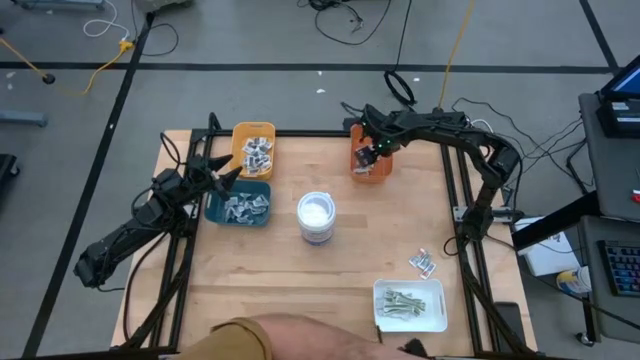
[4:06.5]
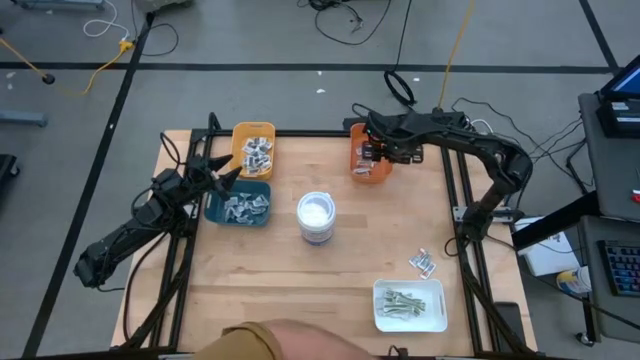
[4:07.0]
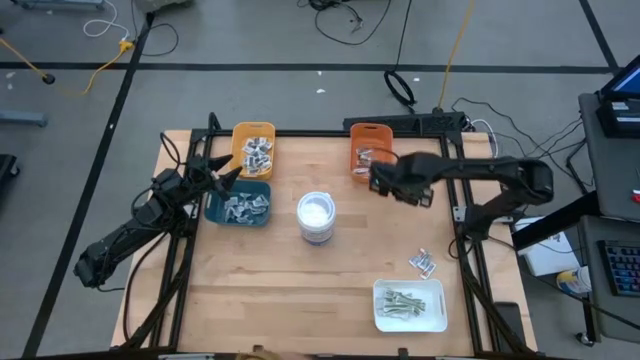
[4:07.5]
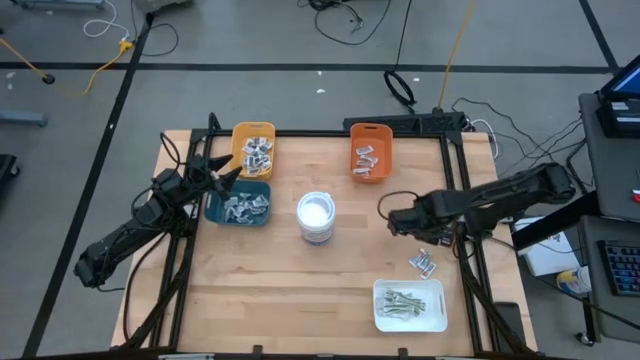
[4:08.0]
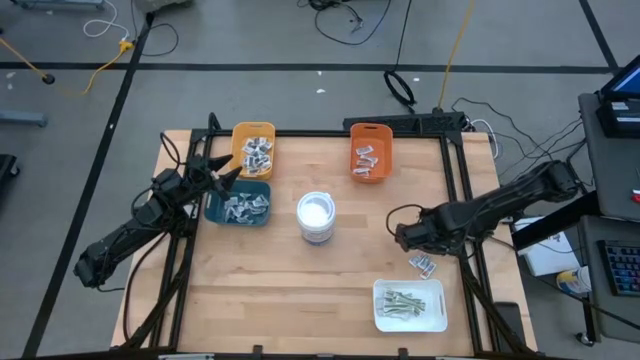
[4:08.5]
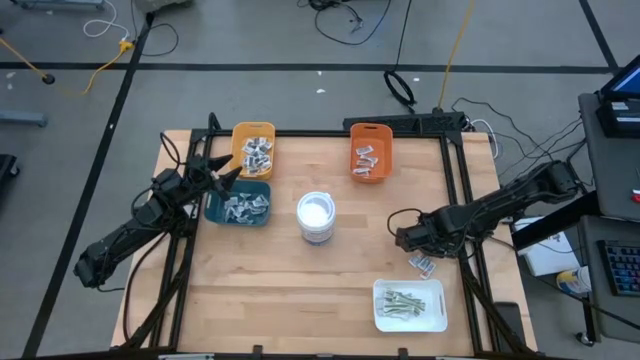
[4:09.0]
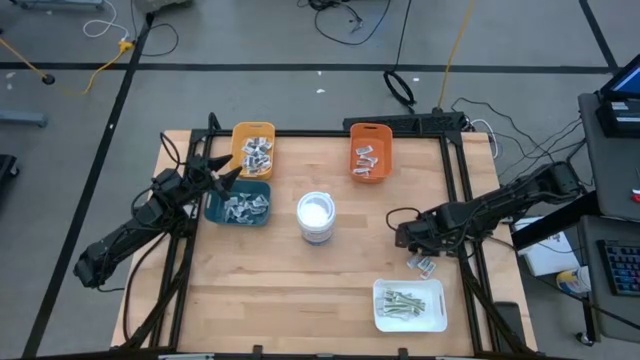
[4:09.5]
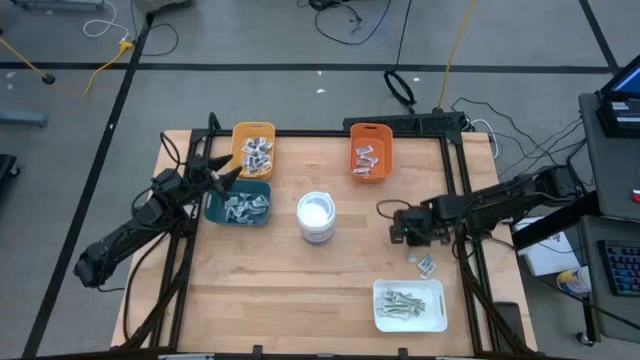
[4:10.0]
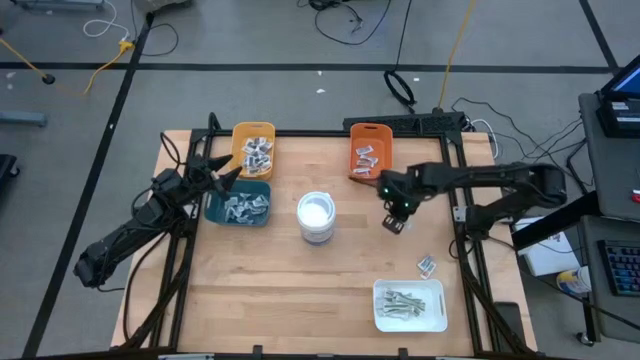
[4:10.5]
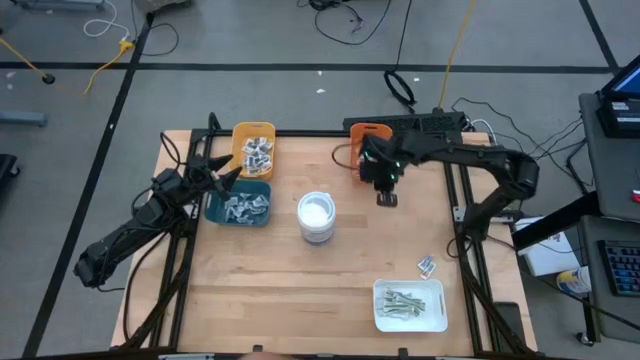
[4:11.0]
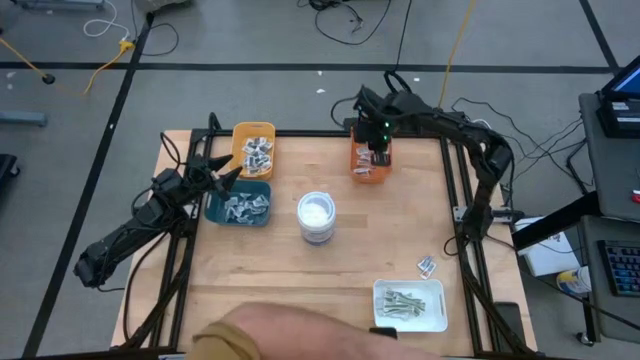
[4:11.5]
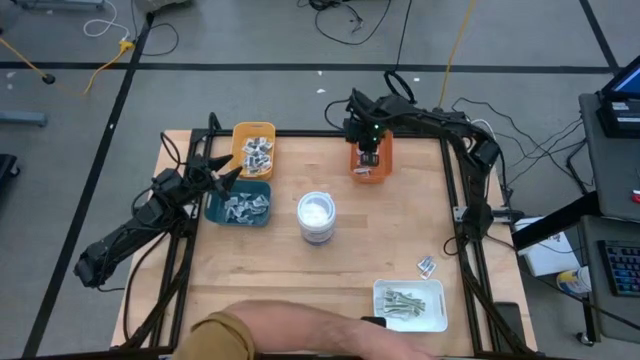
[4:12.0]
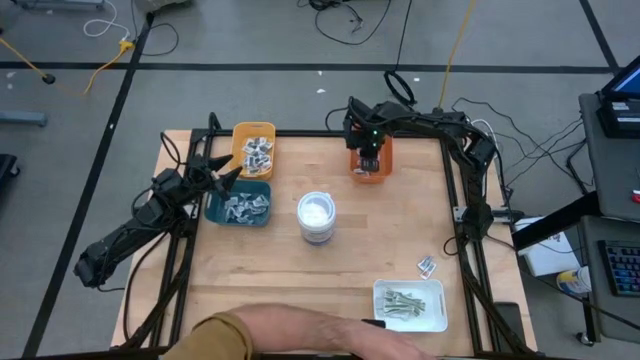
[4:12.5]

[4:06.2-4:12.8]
Task: Pick & Place First Aid Supplies
Put the orange pad into the orange bin

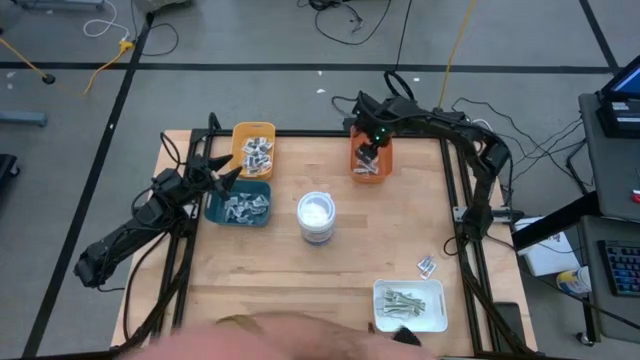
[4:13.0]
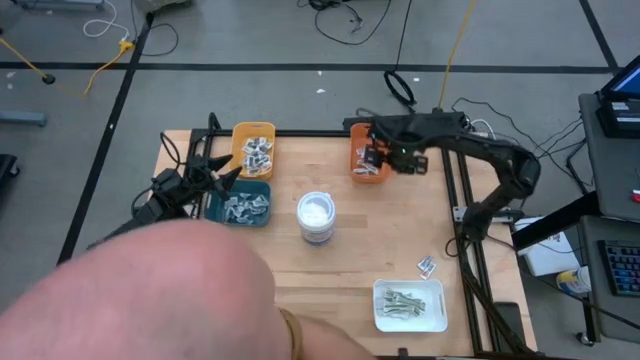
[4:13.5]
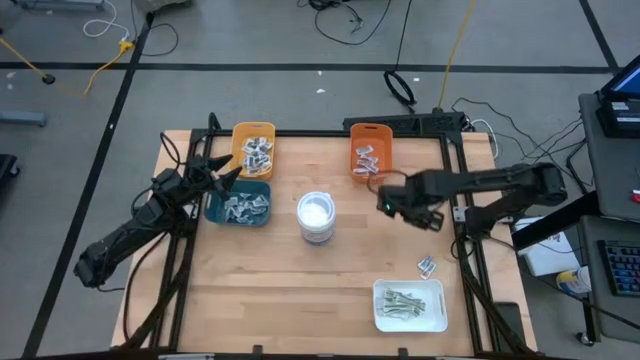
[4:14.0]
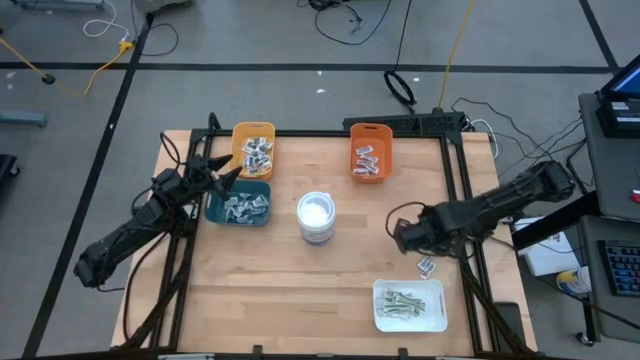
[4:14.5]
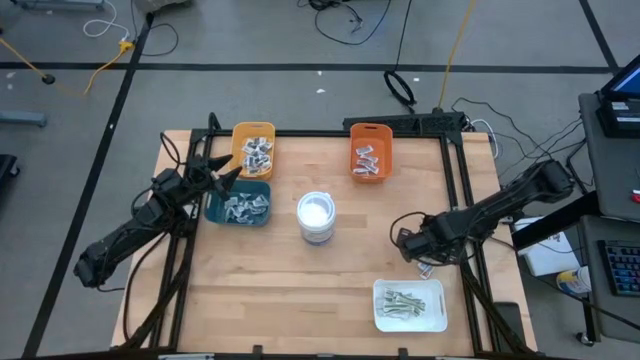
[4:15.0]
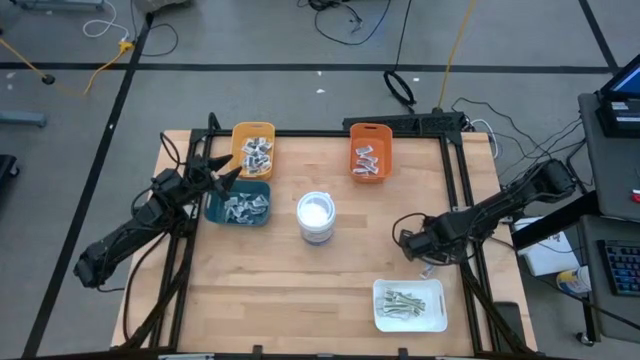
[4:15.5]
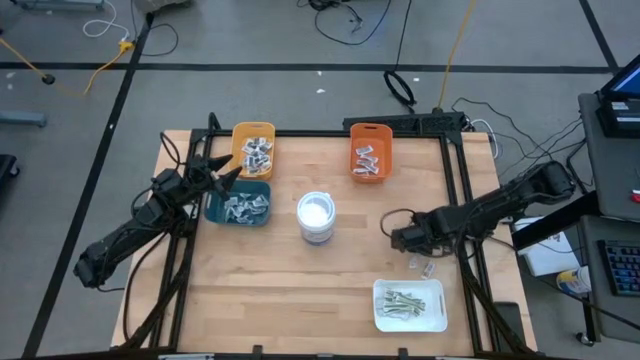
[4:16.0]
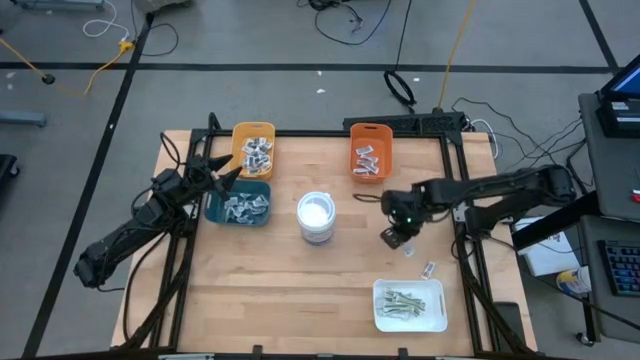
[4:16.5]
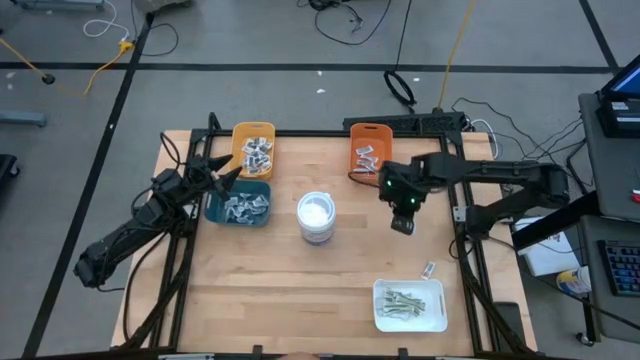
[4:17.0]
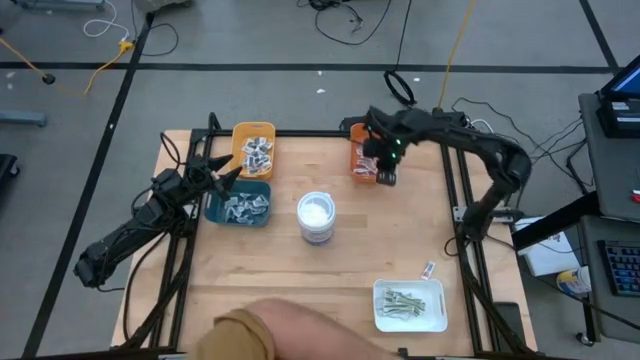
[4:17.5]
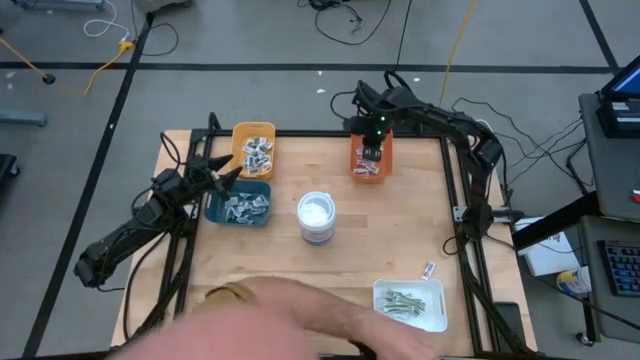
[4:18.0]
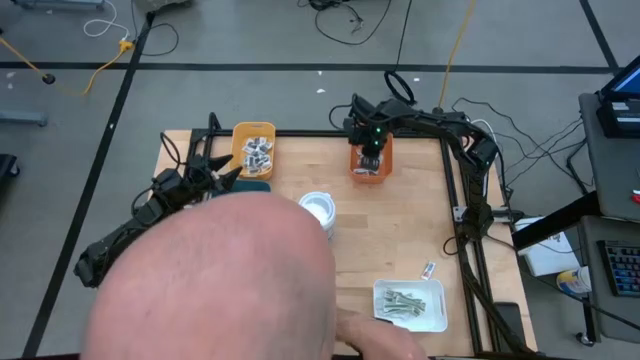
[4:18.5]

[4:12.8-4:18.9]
Put the orange pad into the orange bin

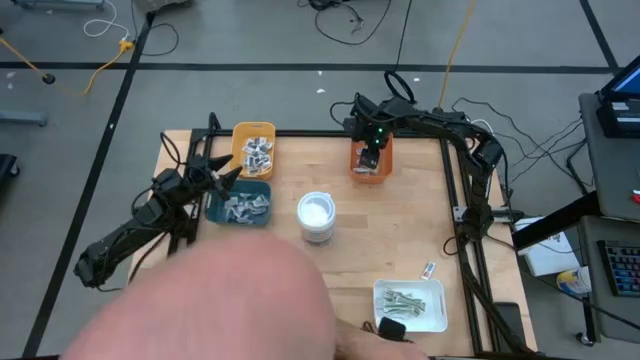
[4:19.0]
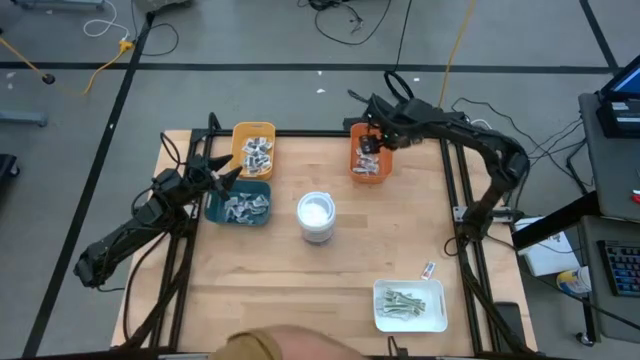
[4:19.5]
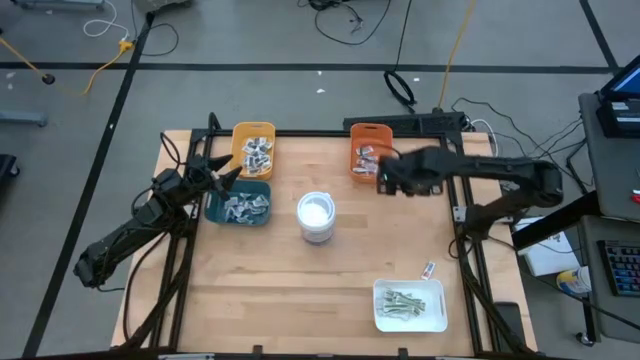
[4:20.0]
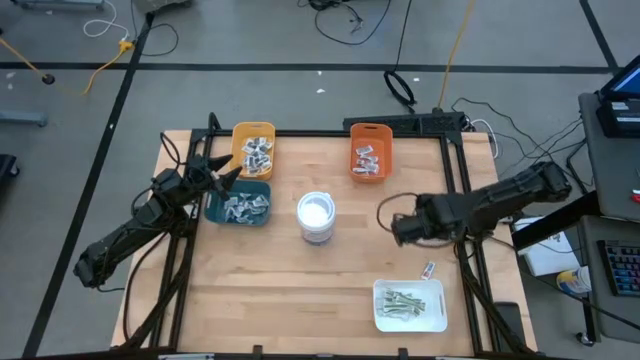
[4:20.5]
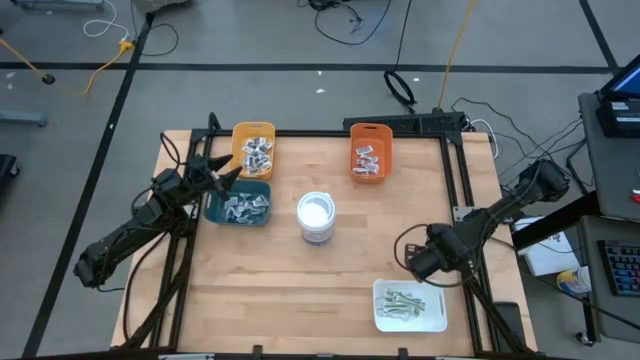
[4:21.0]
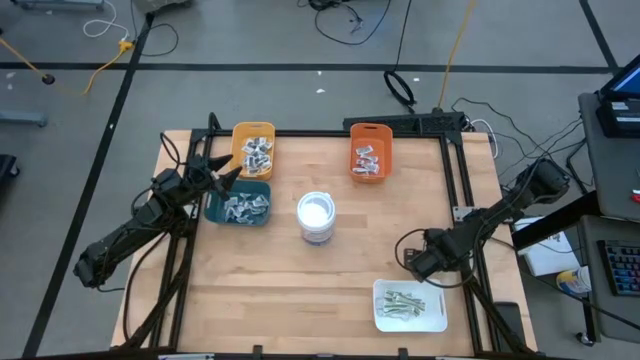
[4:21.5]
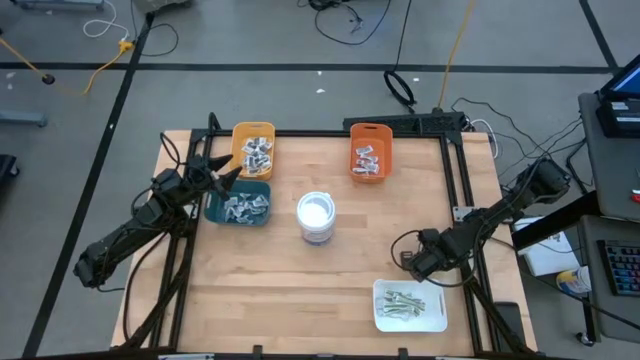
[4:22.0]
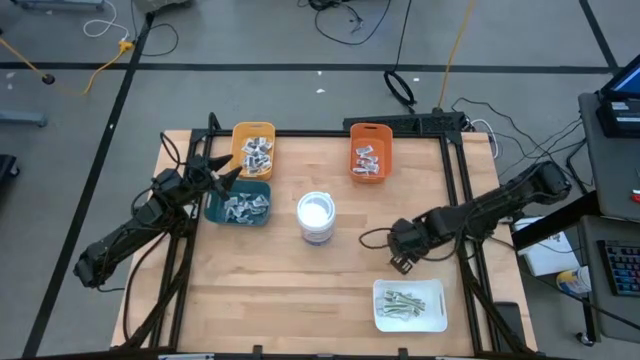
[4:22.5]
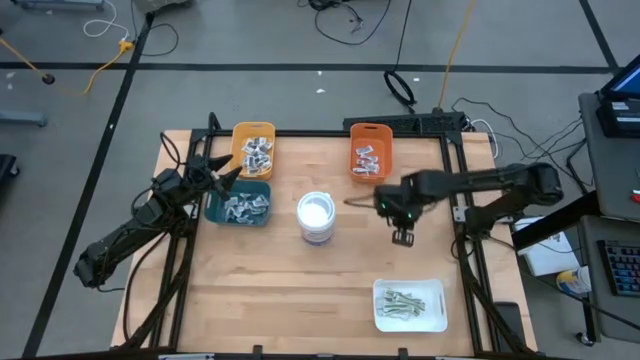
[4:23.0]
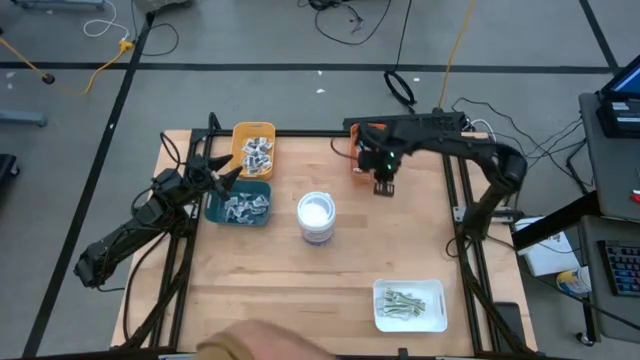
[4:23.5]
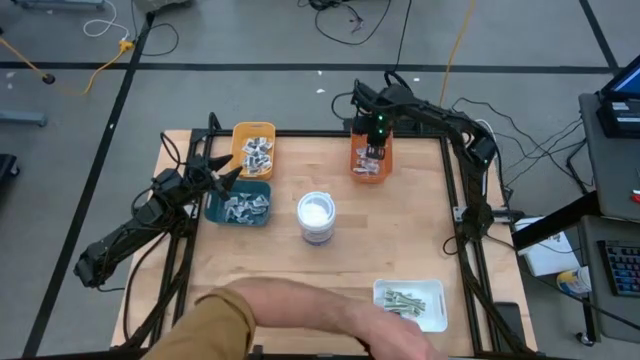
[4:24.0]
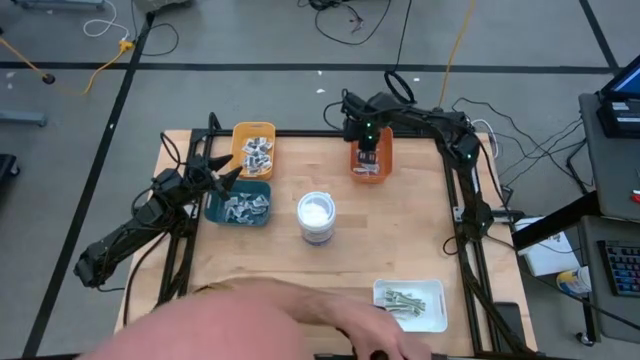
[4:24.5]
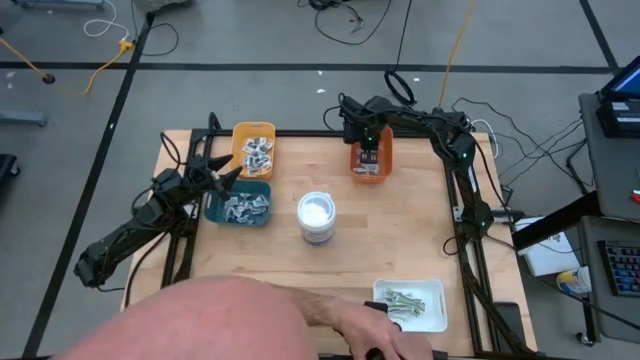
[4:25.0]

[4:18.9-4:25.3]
Put the orange pad into the orange bin

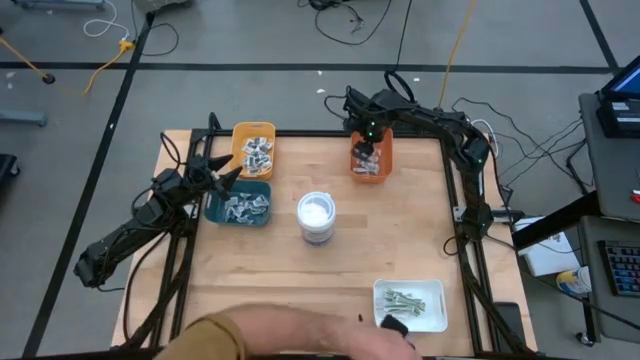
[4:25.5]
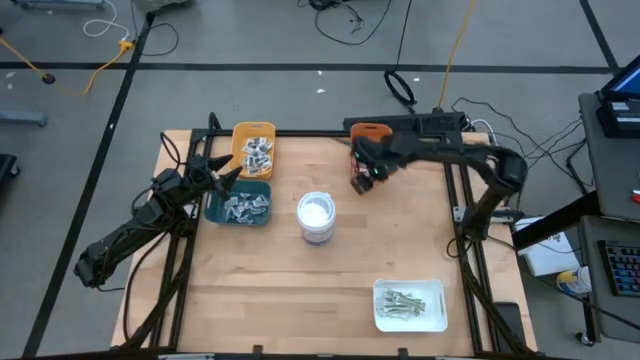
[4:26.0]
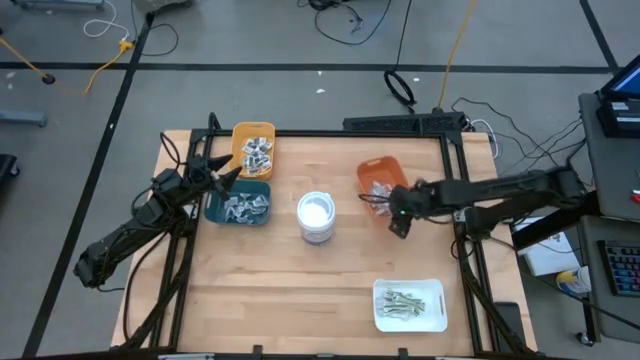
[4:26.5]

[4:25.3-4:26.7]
Adjust the orange bin
